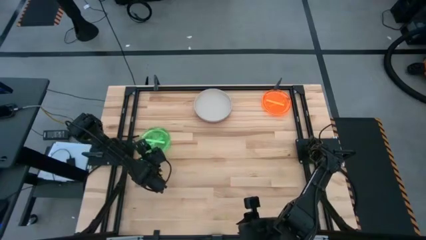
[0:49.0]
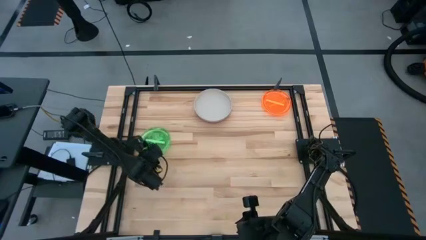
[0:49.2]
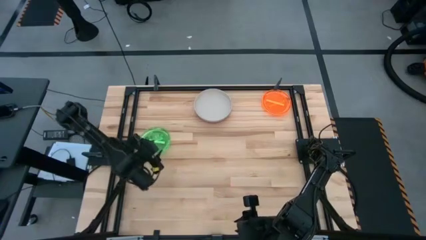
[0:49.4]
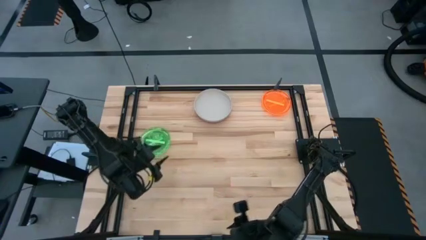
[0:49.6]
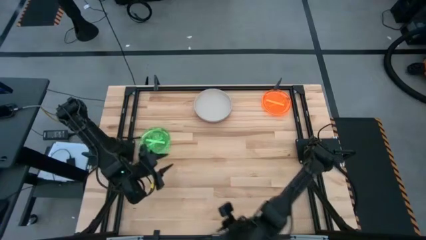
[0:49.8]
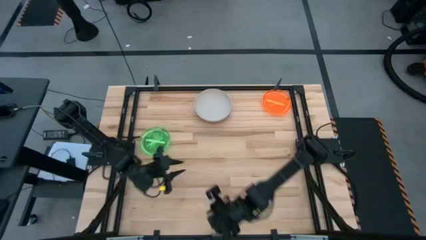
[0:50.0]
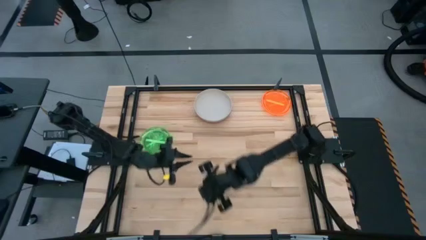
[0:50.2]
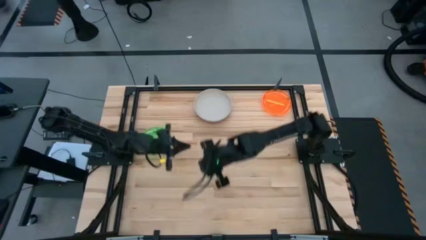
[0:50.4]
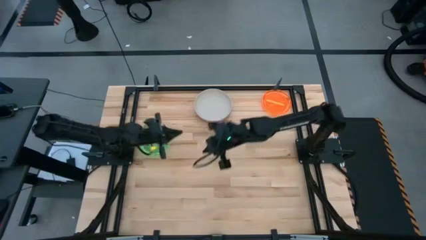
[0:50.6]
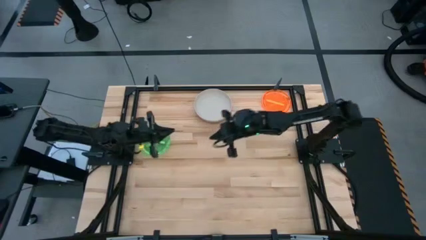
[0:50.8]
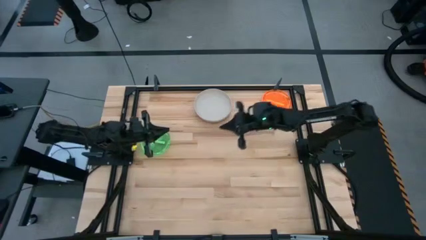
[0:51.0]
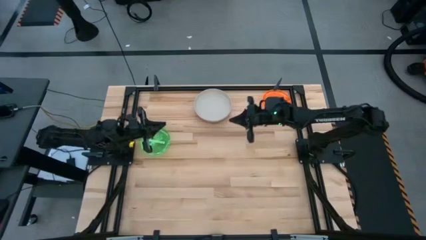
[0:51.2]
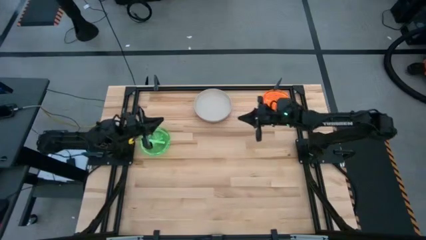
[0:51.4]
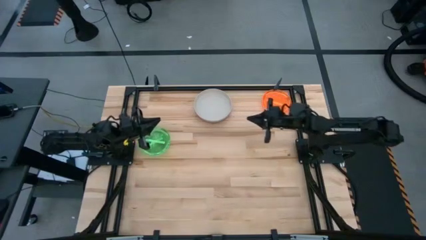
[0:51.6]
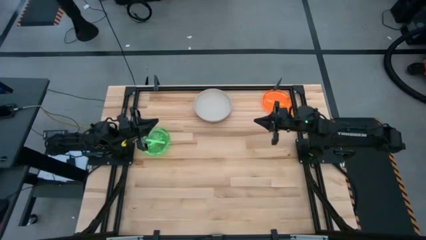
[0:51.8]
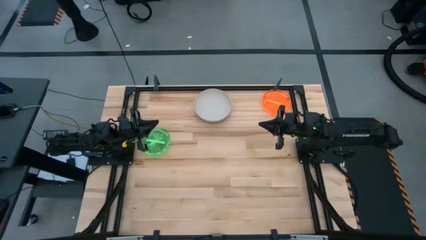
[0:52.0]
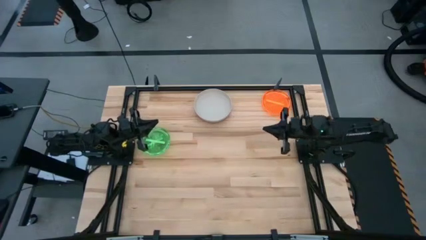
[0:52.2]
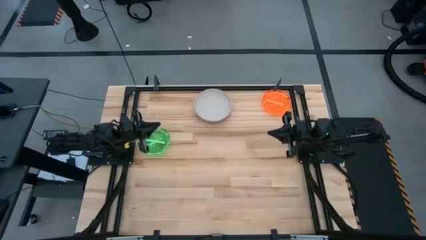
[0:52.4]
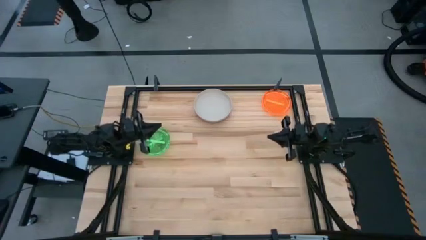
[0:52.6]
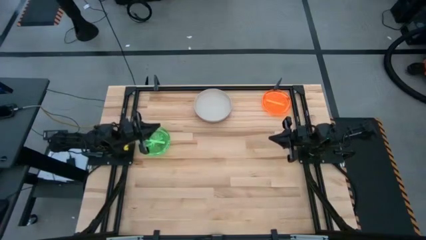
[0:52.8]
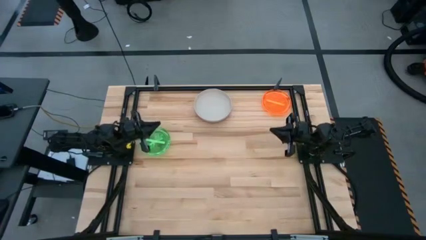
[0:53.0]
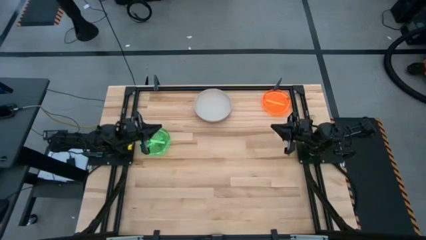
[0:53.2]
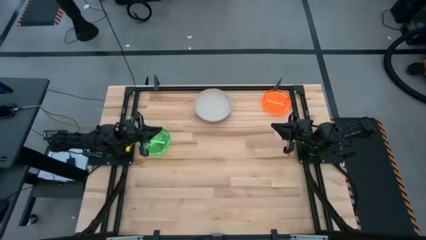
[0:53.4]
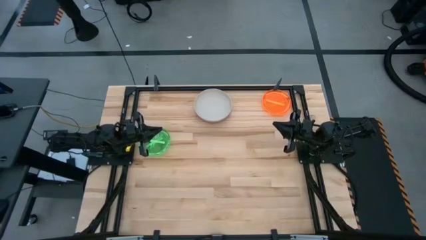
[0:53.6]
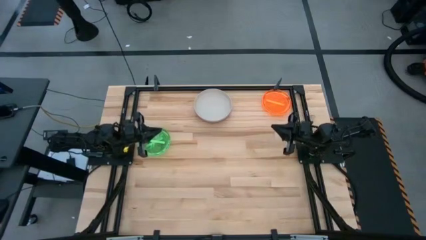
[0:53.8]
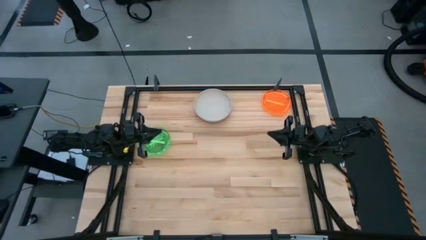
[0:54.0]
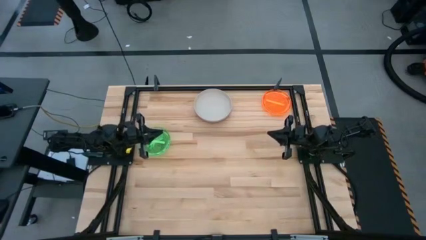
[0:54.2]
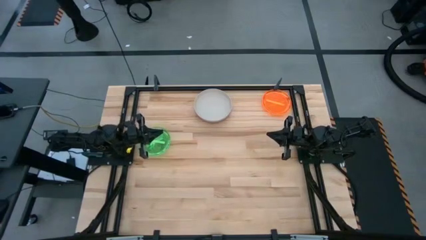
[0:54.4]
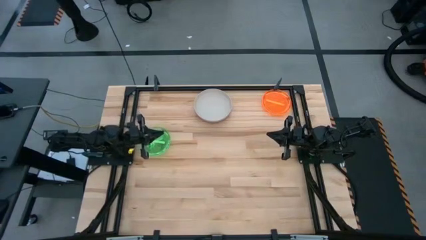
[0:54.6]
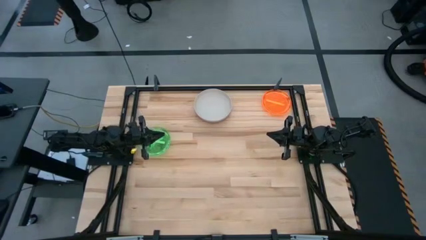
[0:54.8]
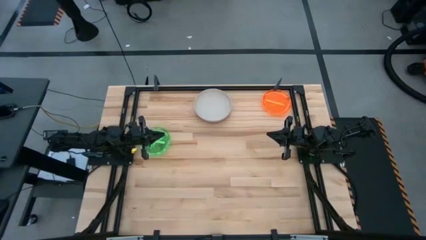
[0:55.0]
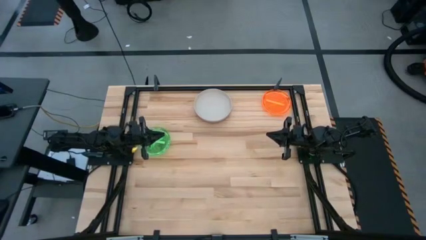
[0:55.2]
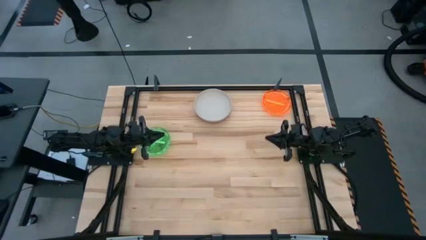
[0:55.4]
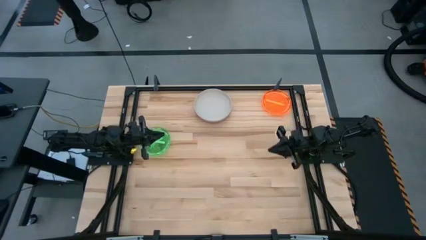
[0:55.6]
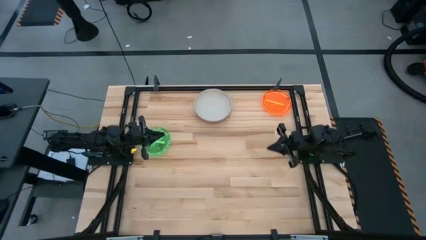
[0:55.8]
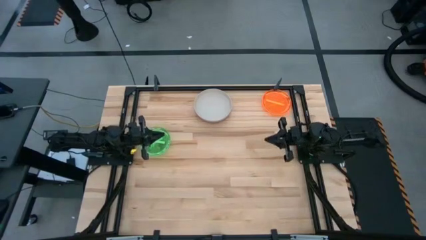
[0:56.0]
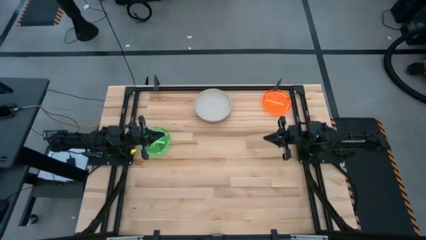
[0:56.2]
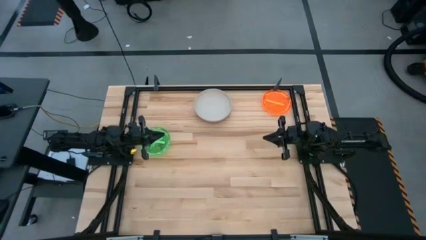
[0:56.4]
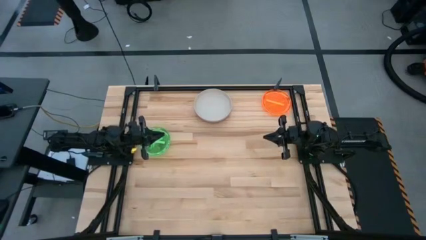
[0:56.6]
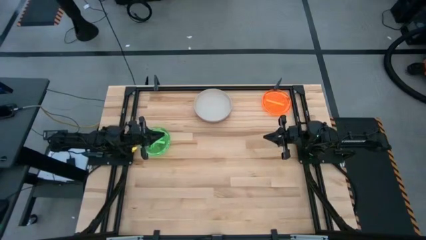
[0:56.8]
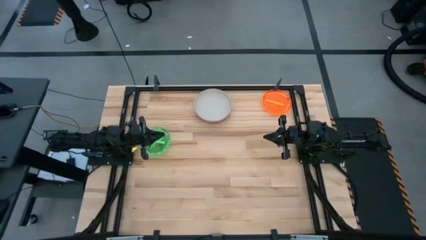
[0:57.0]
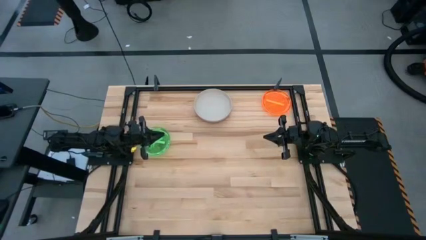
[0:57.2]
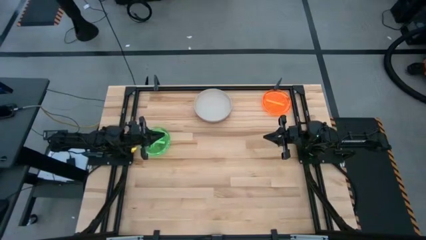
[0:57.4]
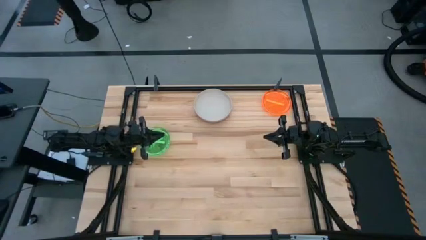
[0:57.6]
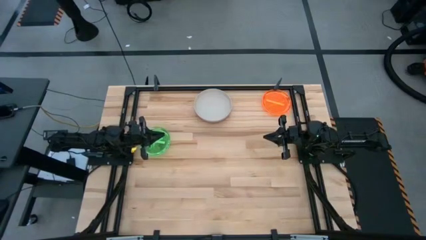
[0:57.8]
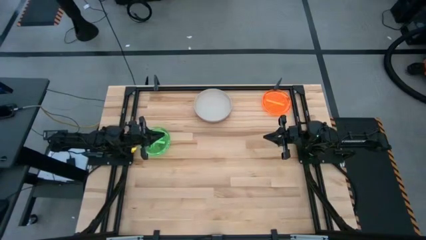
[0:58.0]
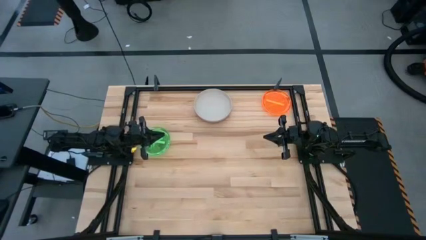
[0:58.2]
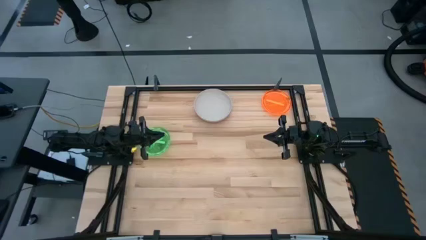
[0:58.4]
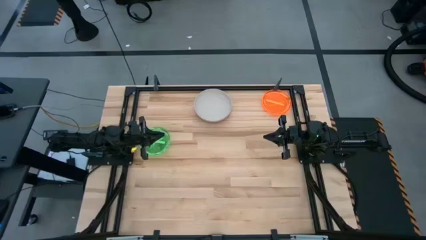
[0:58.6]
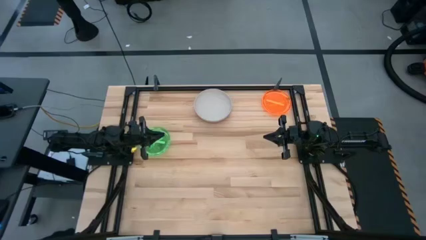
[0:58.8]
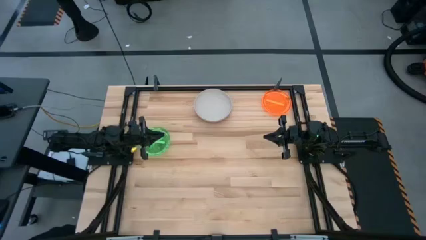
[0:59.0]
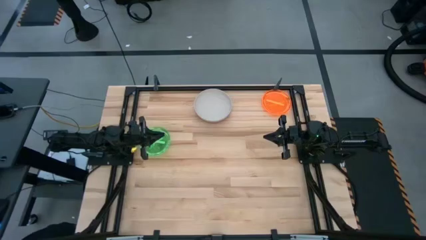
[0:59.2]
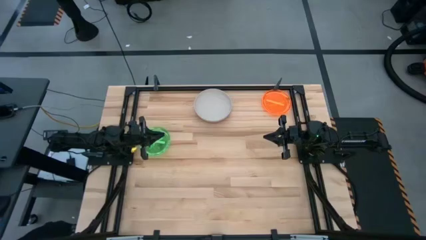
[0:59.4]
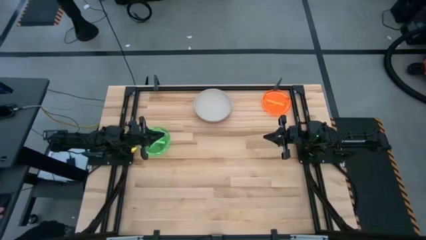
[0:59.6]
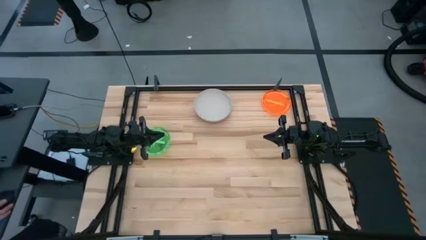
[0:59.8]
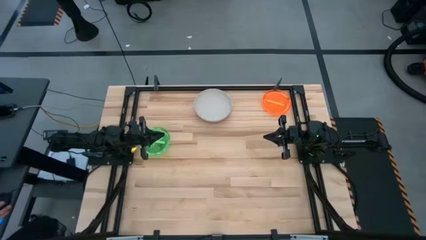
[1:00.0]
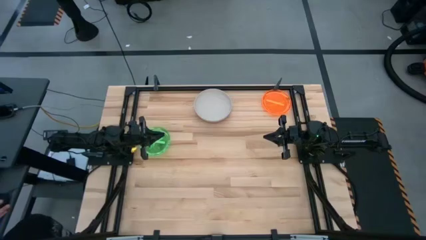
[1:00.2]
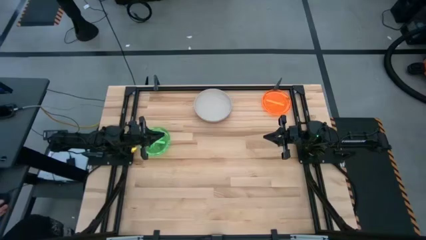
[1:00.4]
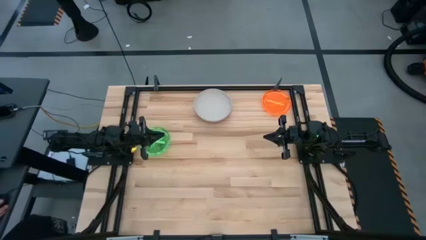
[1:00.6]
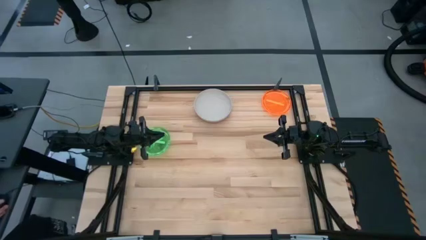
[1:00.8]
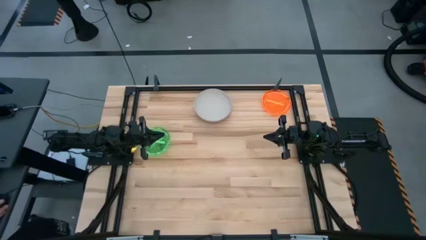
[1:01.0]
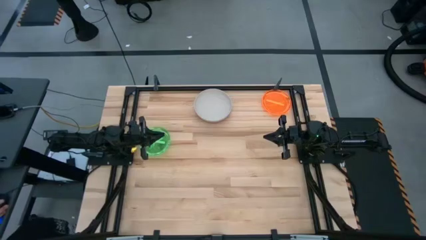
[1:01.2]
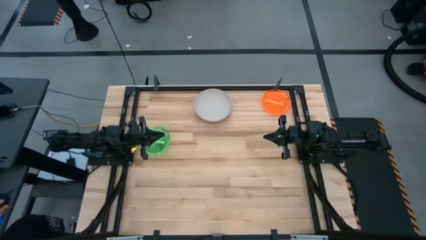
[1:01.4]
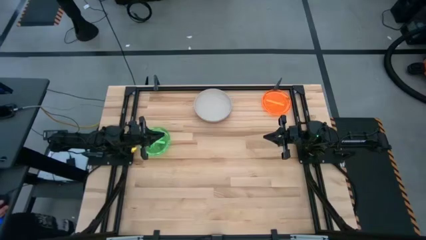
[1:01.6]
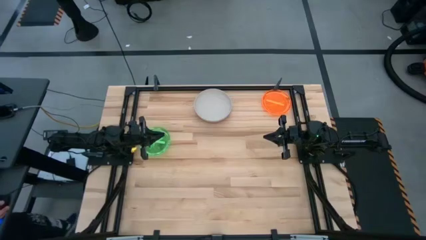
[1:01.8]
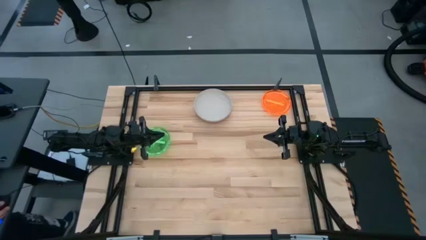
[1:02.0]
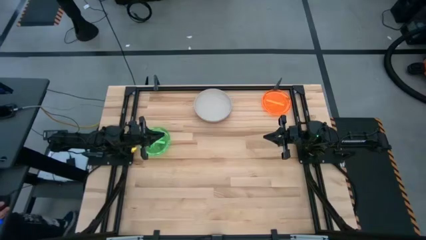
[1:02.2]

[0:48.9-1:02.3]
Task: Stack plastic plates
Return to Home Position

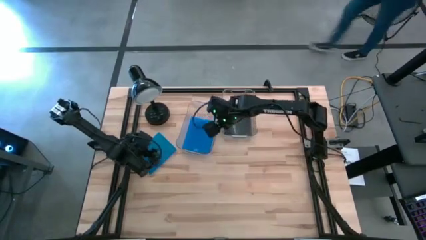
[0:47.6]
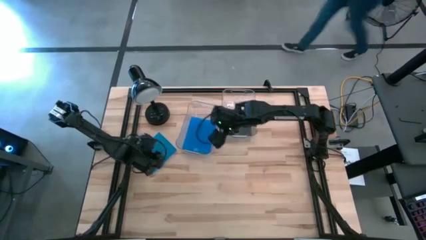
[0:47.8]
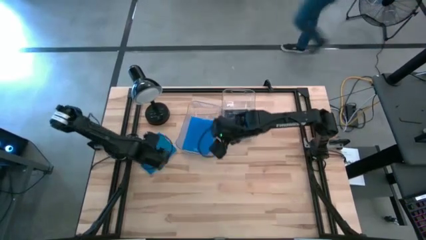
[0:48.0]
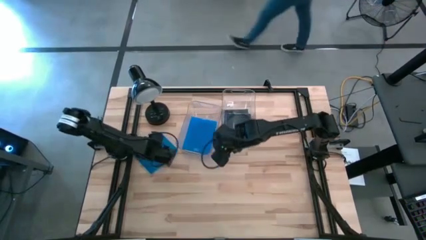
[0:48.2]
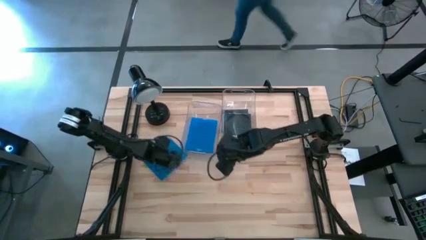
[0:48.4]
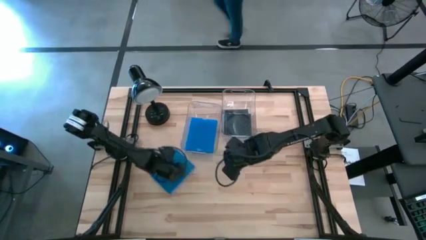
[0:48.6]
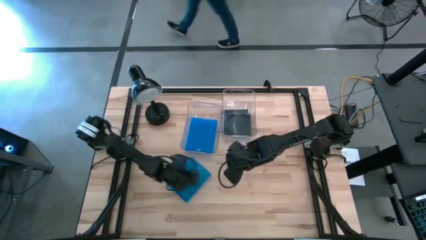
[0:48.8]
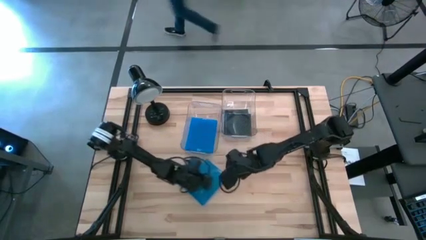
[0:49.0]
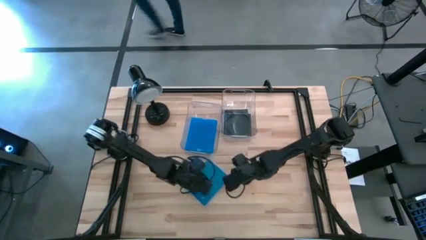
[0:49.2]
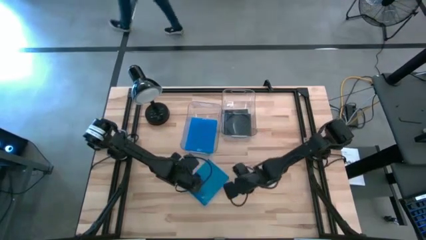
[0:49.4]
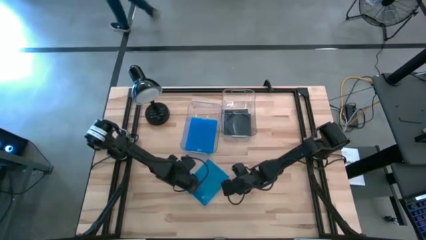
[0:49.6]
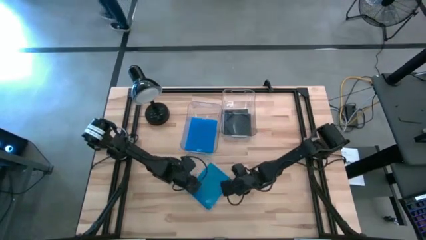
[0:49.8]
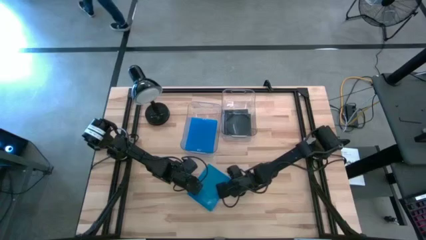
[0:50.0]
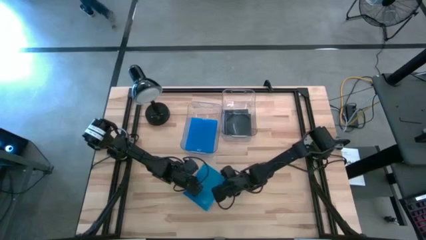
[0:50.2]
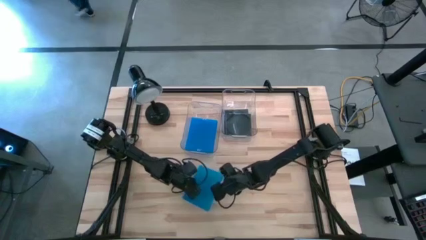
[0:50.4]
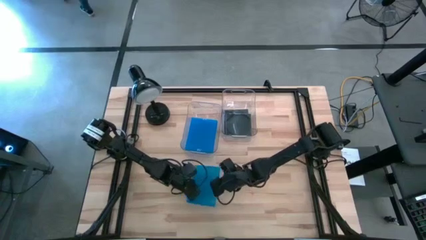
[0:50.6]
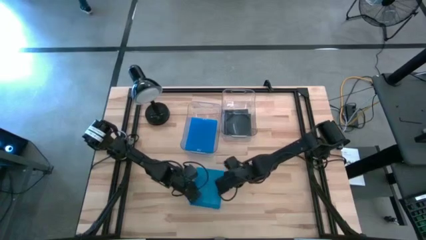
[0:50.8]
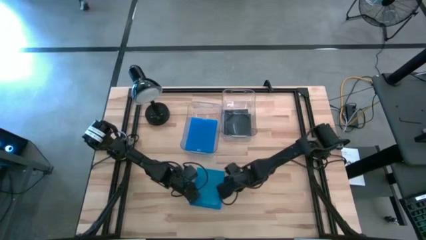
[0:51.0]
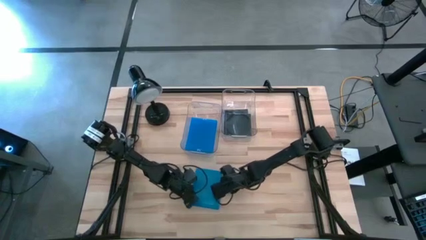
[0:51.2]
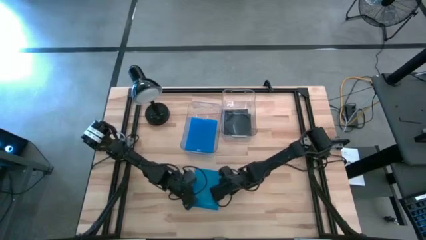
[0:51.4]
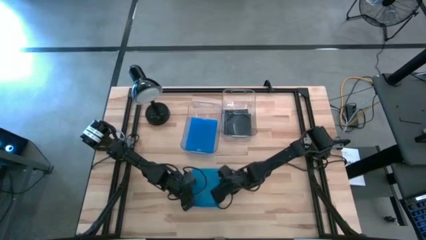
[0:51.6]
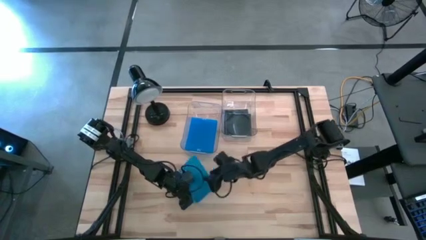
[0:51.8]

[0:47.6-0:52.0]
Task: Pick & place jewel cases by type
Put the blue CD case into the left transparent bin
